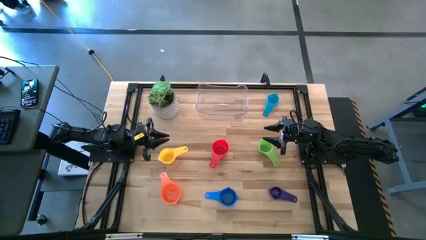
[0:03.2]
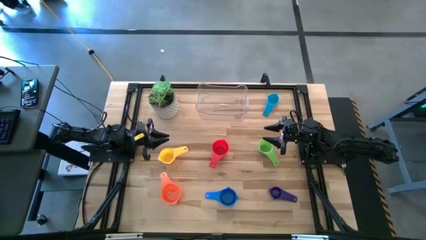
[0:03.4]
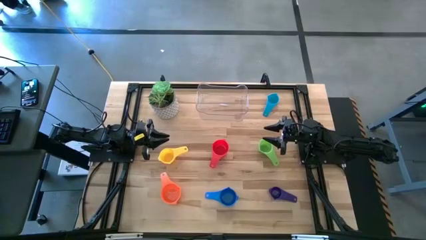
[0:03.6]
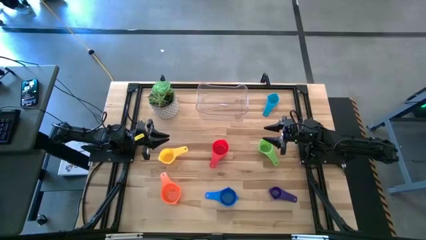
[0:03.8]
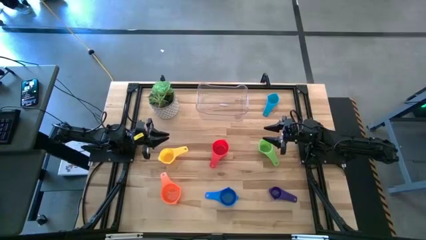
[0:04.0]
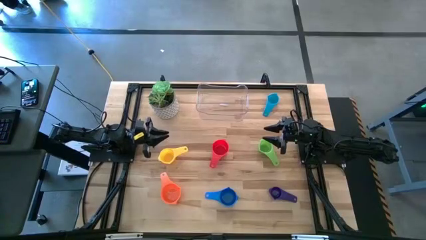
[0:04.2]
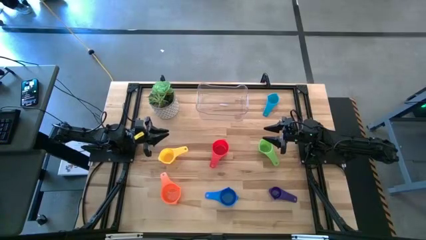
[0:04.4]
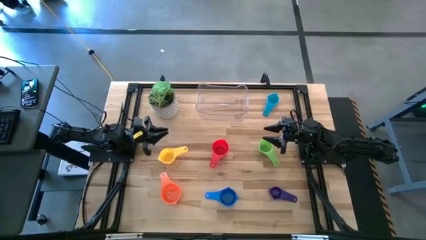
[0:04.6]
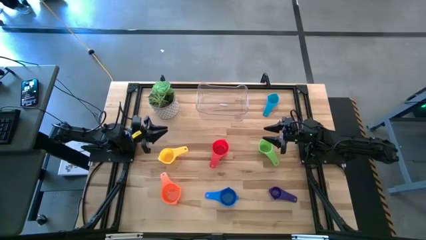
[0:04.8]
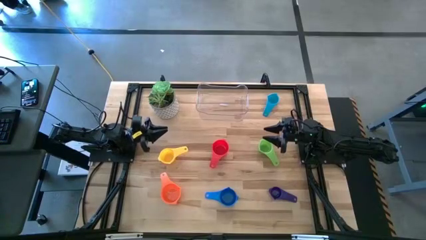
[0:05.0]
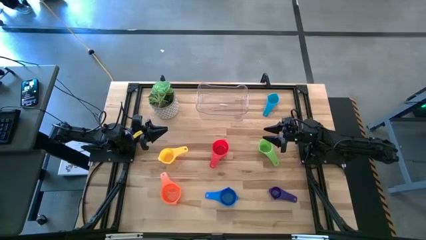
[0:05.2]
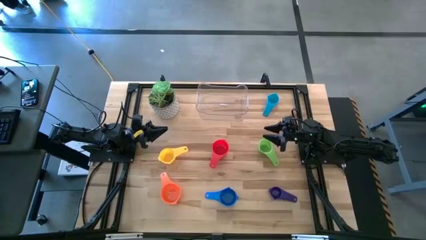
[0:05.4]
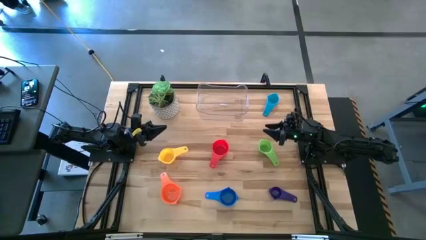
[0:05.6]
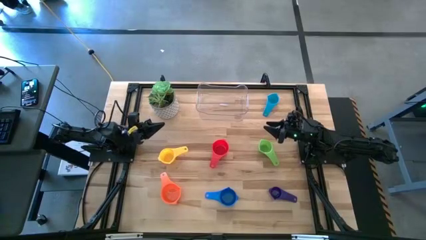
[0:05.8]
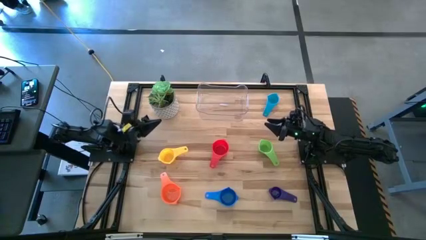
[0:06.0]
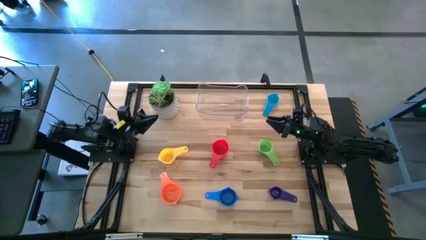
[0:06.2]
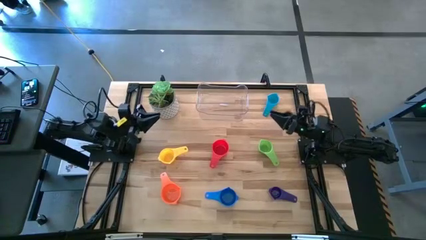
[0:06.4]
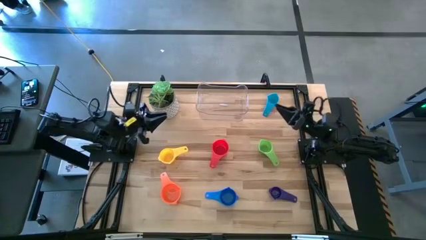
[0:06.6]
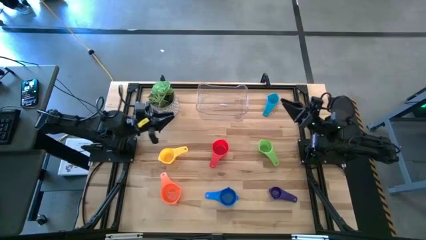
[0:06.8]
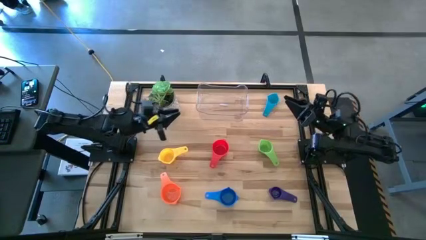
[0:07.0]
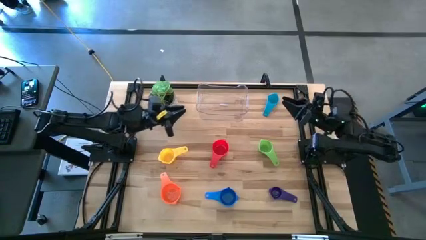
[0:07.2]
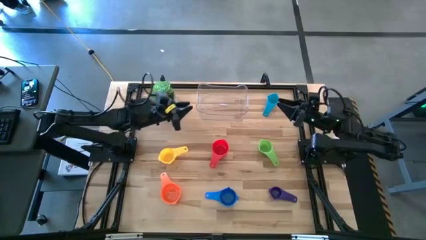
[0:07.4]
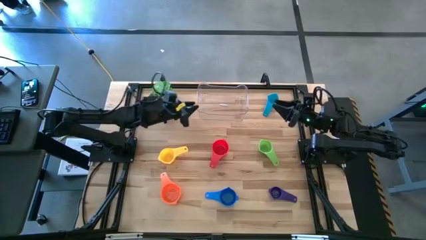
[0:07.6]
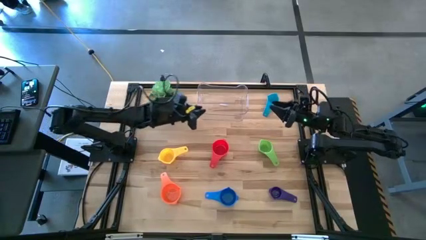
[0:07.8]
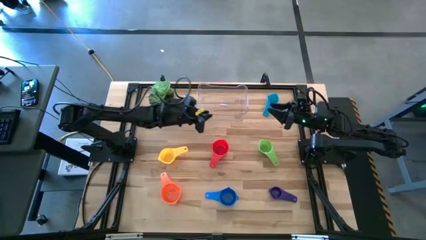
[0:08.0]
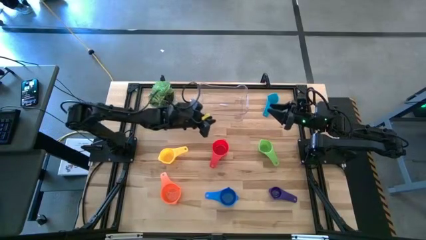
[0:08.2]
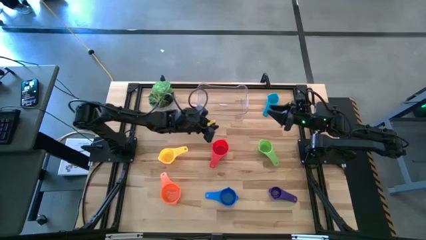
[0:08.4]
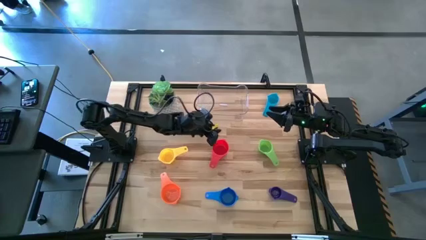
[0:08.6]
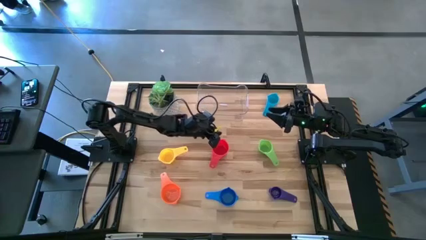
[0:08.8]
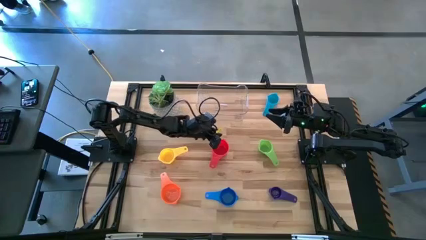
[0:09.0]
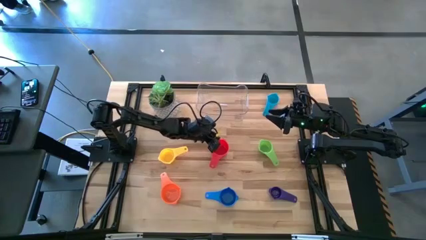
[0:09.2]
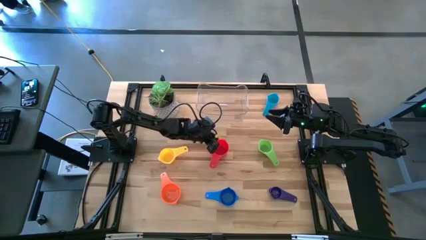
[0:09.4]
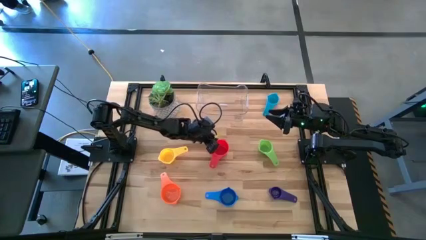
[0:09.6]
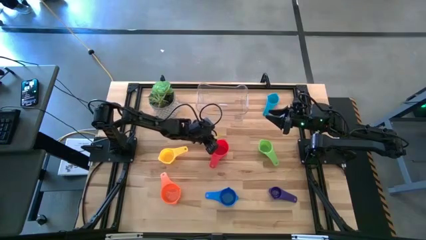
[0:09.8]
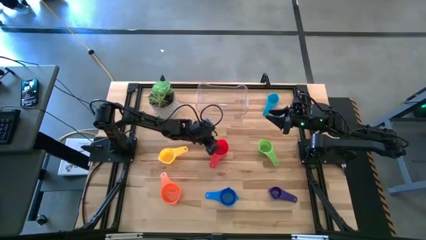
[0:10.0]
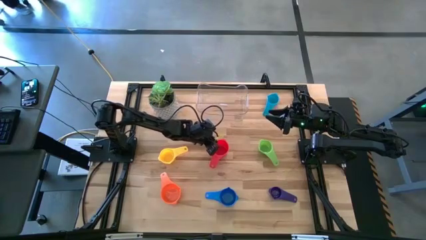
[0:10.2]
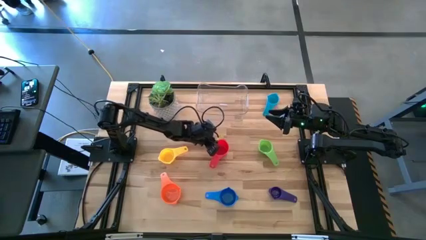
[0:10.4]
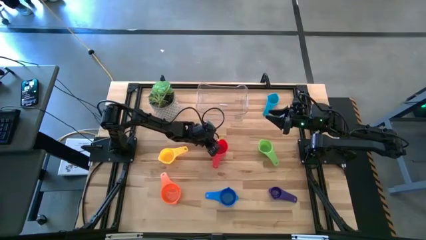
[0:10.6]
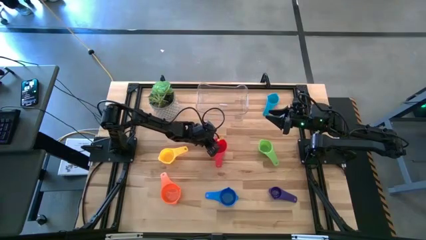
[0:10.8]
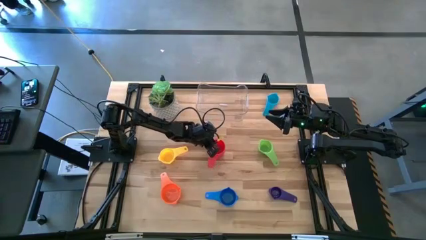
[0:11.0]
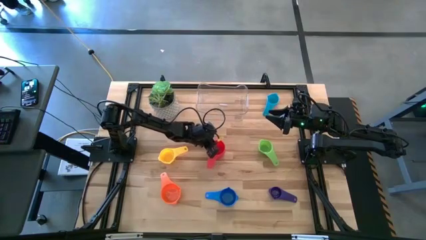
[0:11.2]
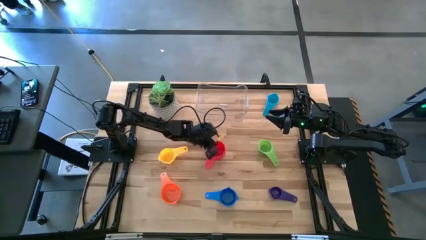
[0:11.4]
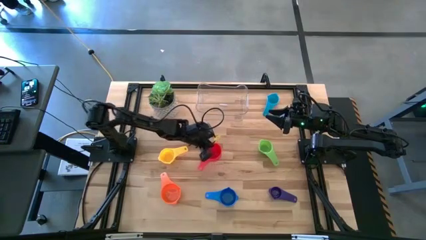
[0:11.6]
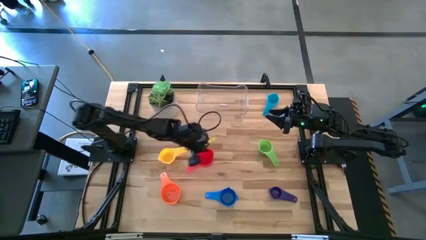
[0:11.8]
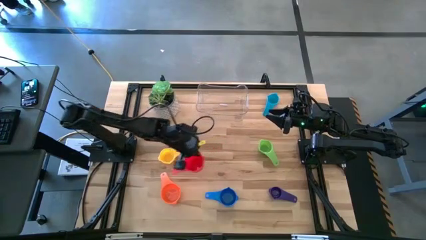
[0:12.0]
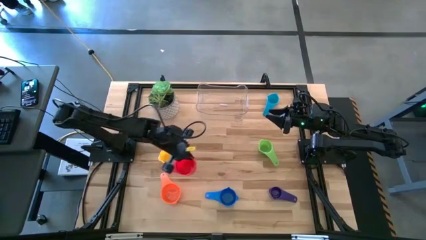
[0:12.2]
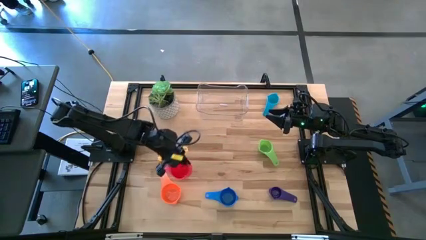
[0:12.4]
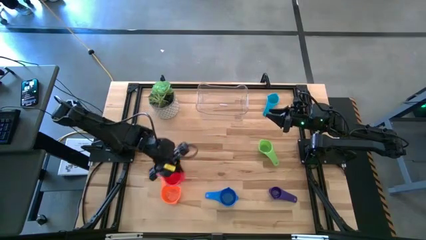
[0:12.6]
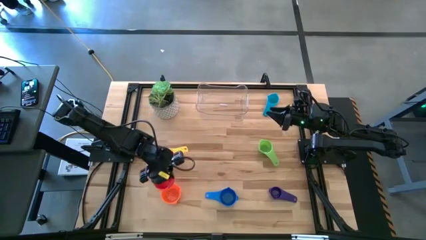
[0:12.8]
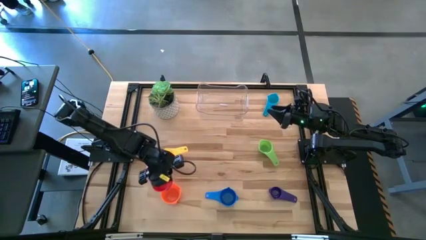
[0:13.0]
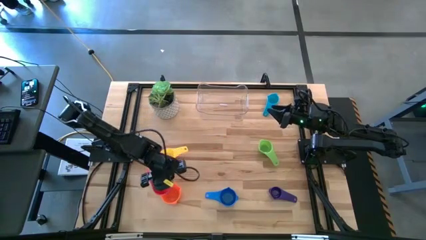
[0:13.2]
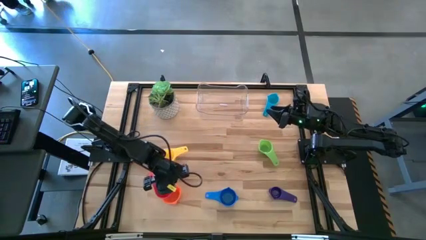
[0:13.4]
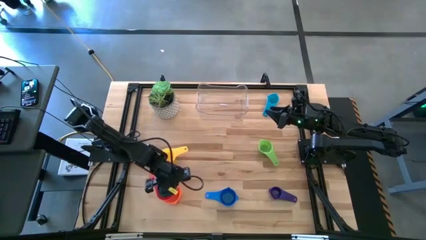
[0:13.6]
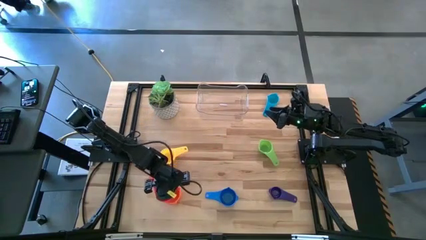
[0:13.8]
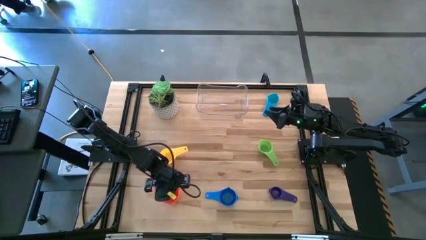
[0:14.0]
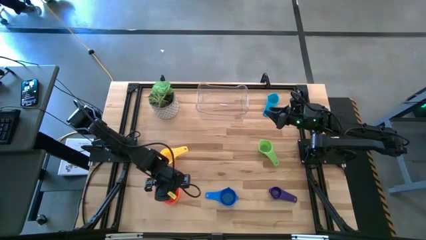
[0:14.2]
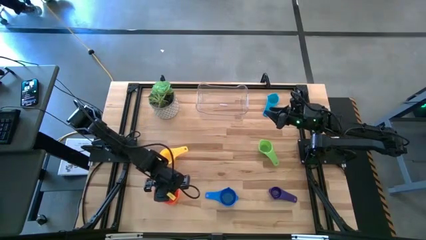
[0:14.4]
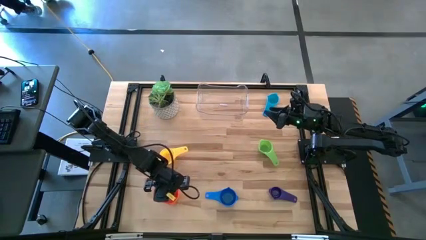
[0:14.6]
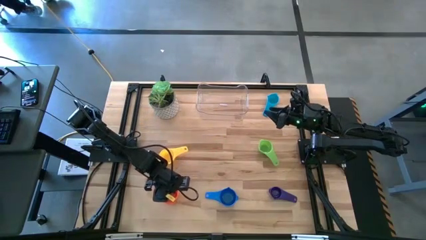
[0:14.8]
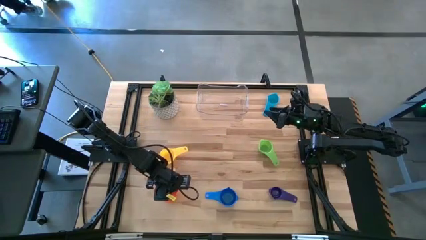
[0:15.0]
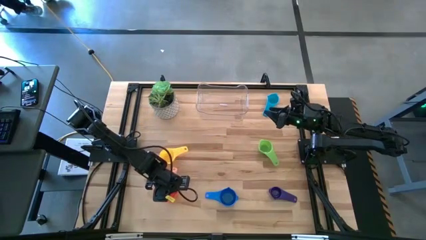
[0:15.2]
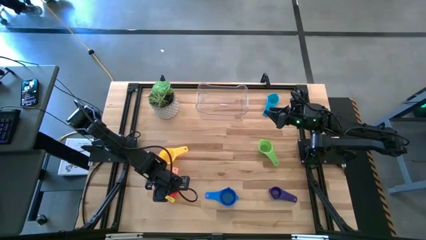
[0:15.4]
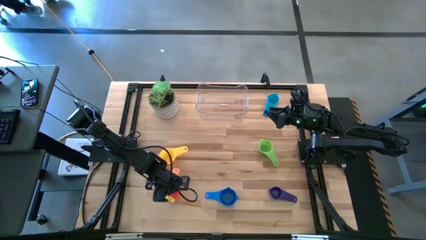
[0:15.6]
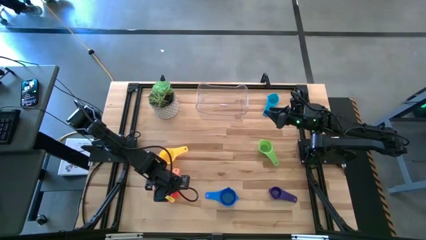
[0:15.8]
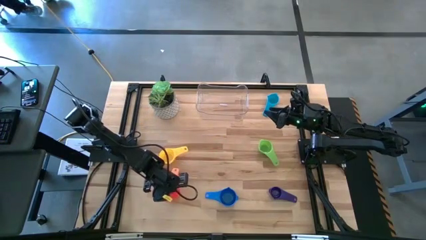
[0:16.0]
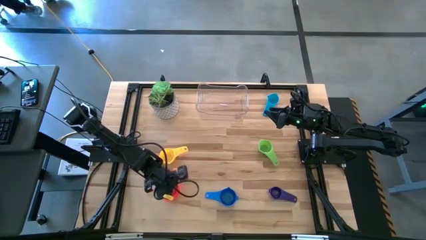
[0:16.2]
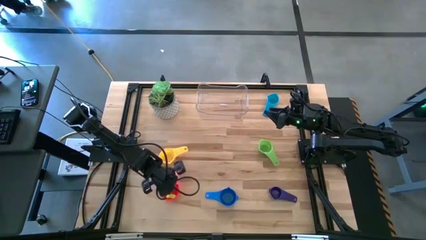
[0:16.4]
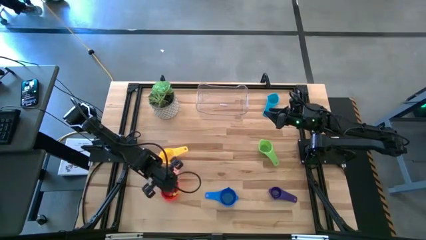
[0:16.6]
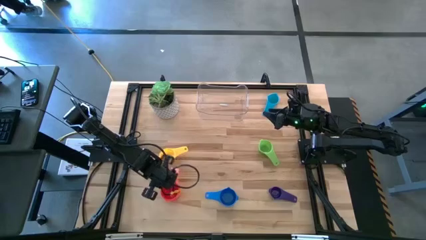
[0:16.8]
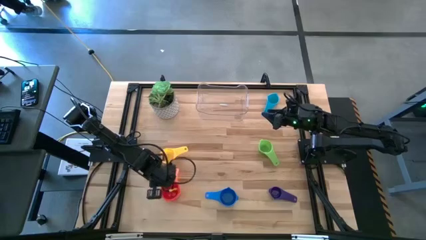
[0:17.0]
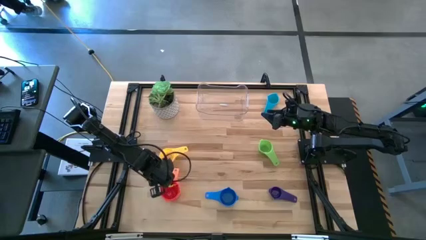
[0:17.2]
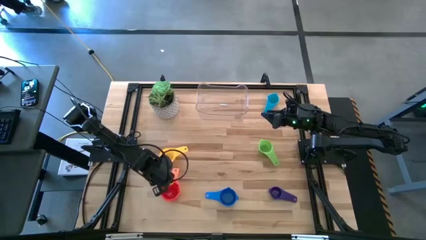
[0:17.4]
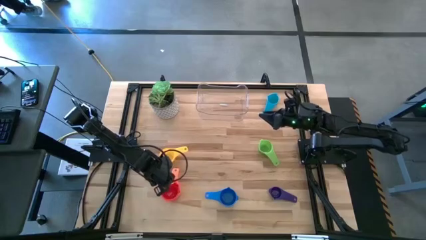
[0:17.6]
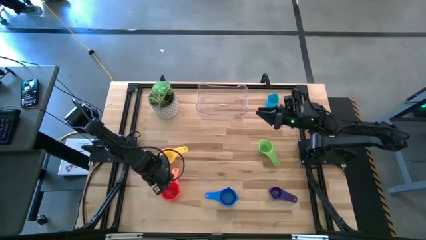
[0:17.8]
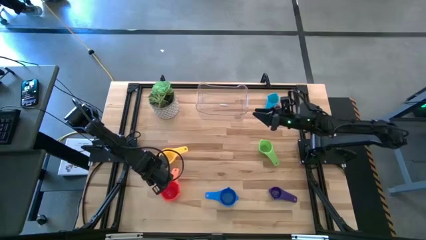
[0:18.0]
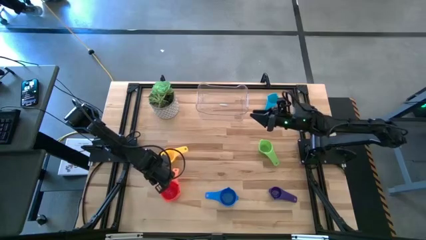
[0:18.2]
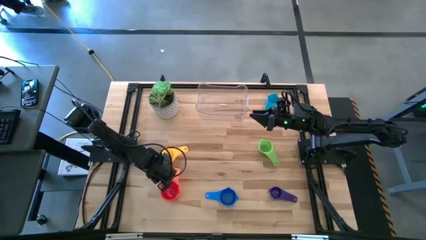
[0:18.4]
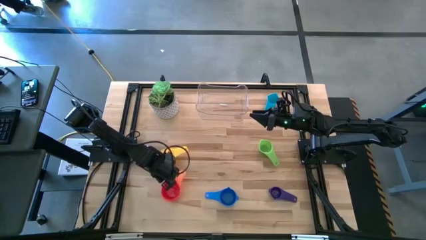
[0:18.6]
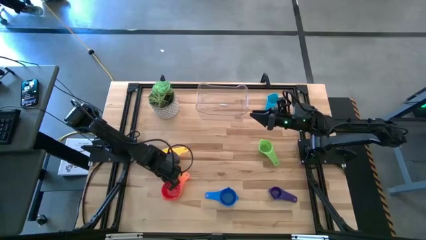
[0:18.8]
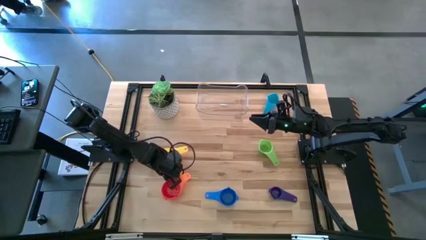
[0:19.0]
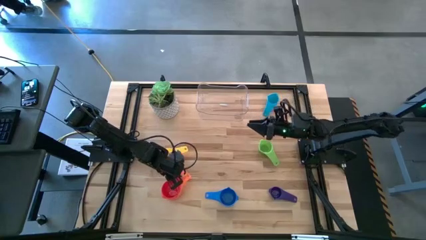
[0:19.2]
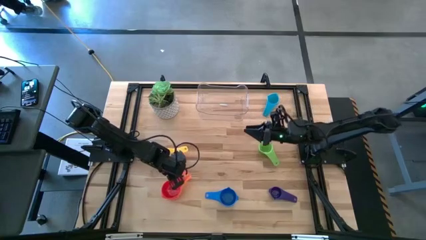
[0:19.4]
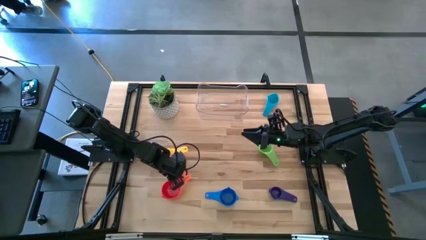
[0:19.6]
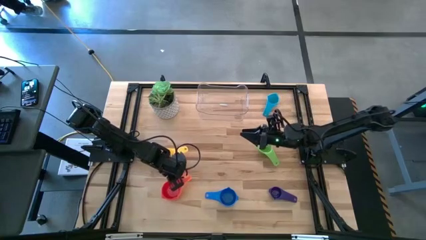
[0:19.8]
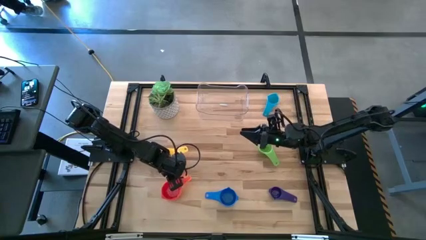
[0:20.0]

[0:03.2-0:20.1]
Task: Nest measuring cups in basket
Stack the red measuring cup on top of the orange measuring cup
